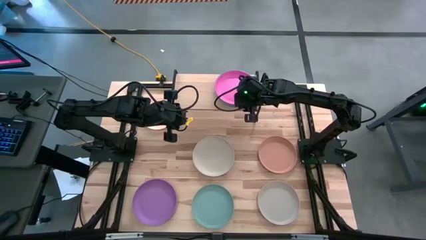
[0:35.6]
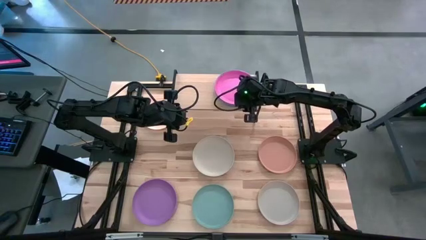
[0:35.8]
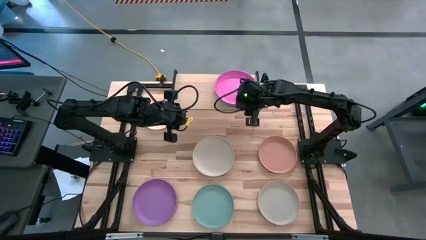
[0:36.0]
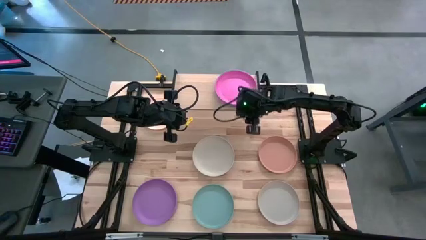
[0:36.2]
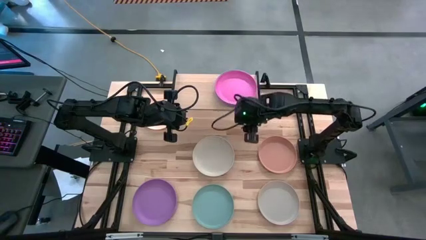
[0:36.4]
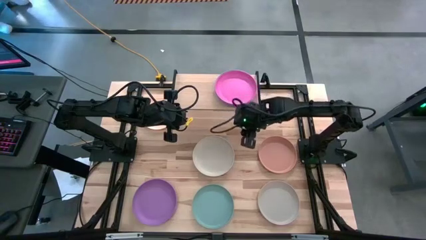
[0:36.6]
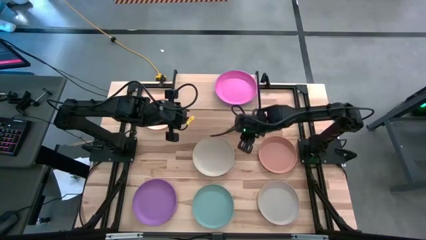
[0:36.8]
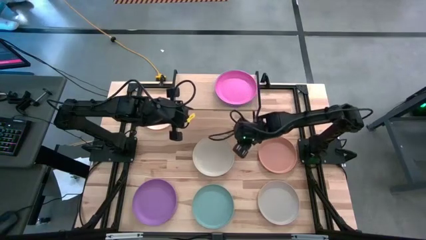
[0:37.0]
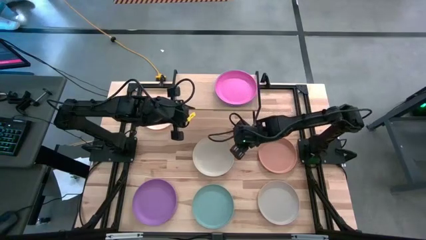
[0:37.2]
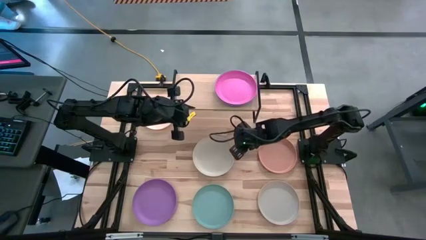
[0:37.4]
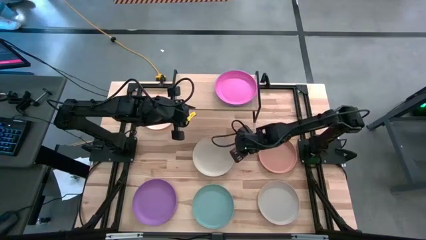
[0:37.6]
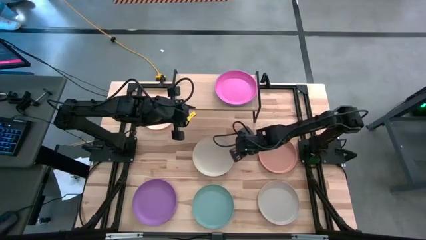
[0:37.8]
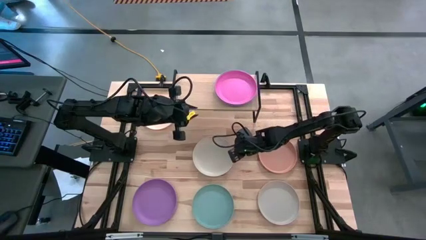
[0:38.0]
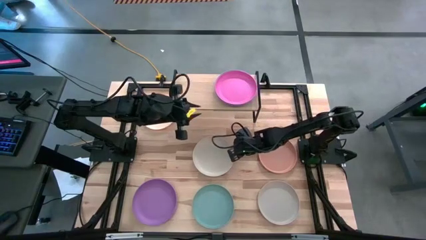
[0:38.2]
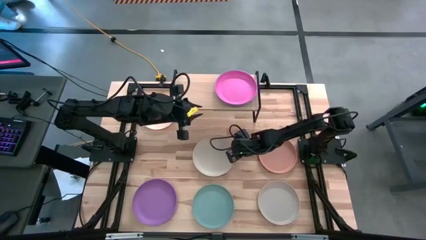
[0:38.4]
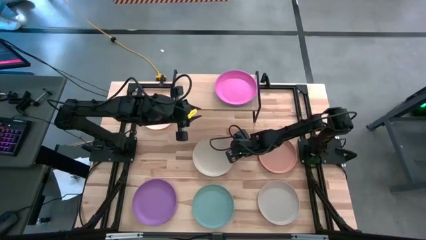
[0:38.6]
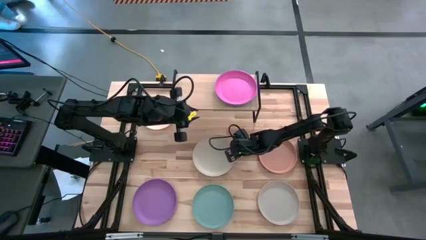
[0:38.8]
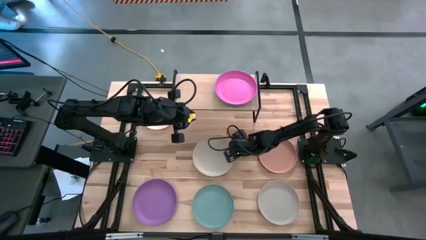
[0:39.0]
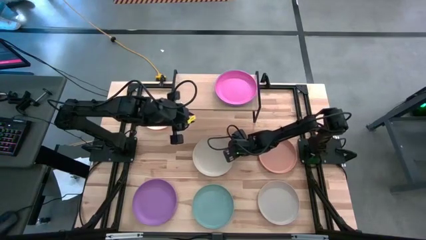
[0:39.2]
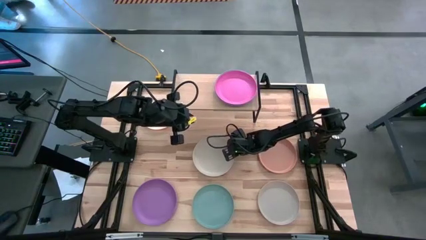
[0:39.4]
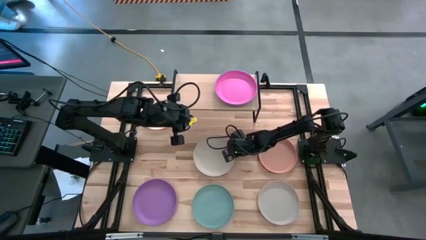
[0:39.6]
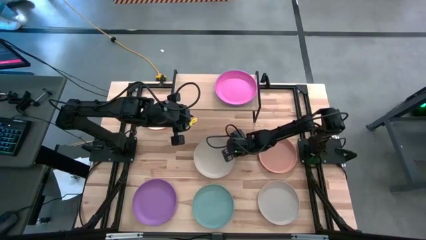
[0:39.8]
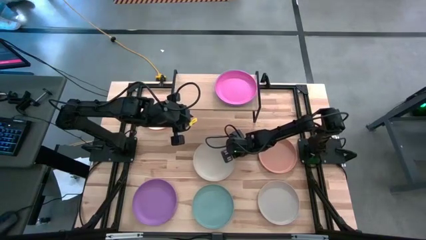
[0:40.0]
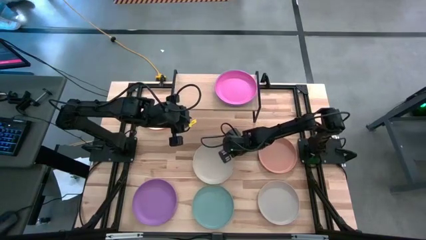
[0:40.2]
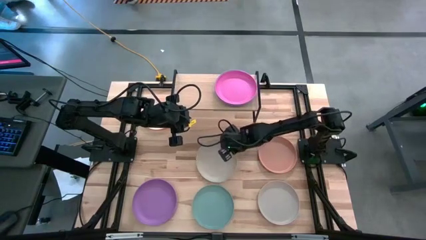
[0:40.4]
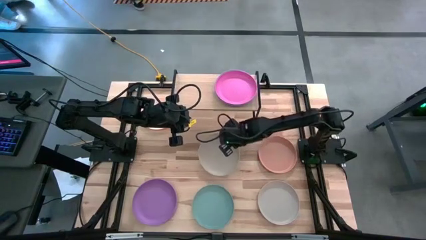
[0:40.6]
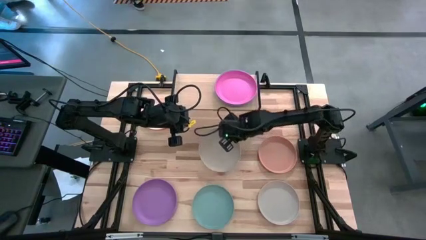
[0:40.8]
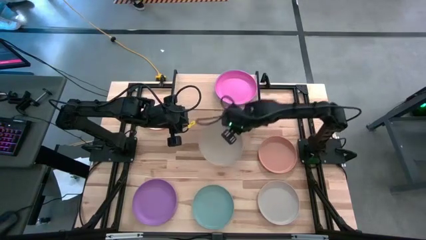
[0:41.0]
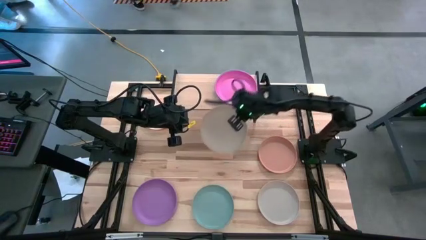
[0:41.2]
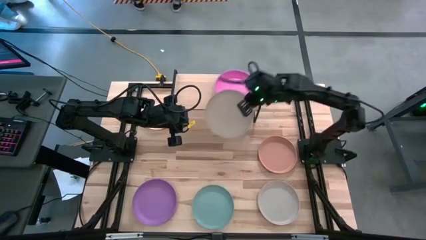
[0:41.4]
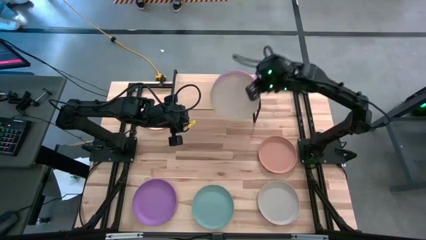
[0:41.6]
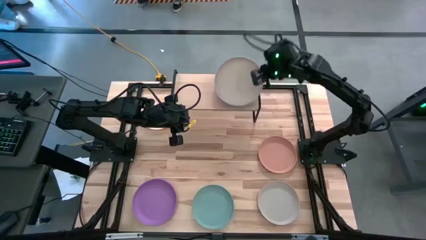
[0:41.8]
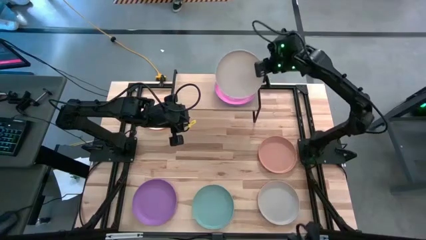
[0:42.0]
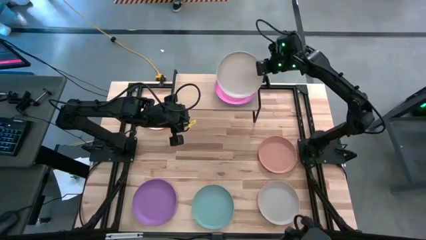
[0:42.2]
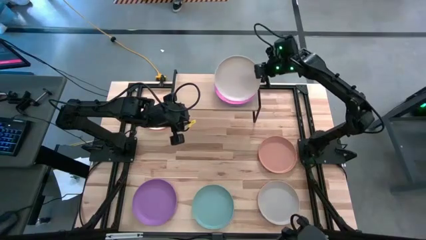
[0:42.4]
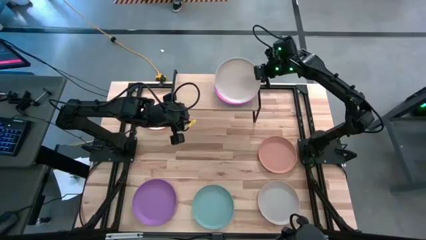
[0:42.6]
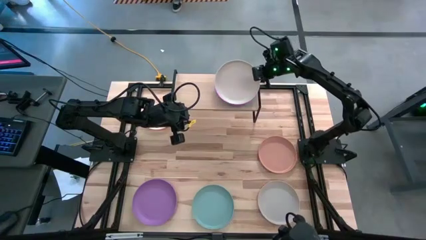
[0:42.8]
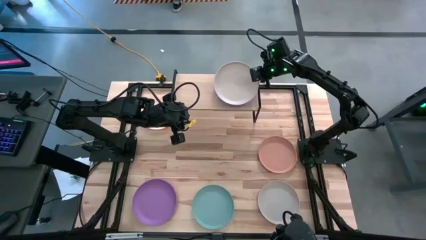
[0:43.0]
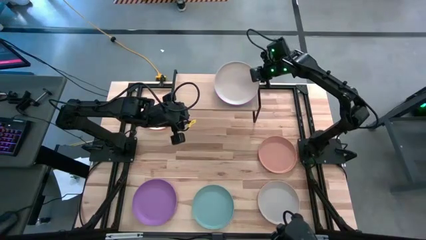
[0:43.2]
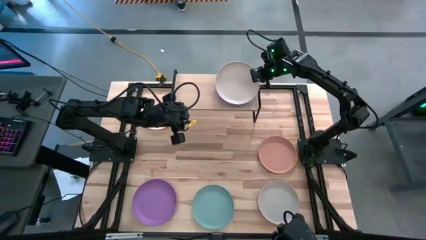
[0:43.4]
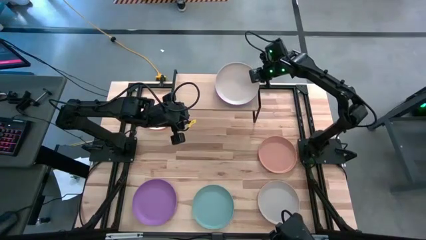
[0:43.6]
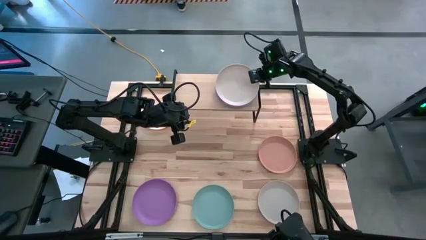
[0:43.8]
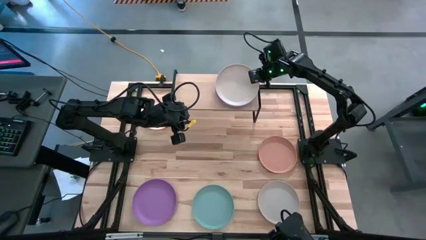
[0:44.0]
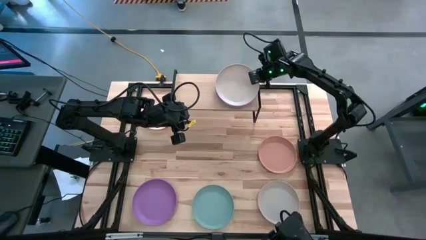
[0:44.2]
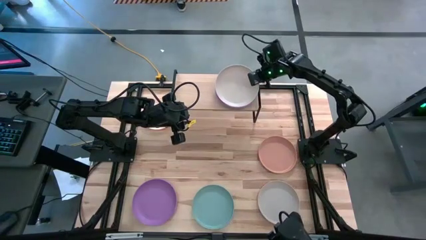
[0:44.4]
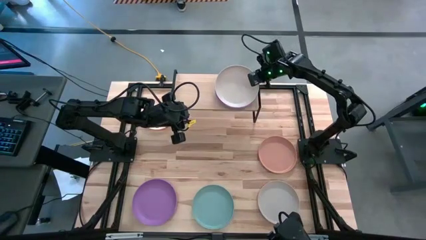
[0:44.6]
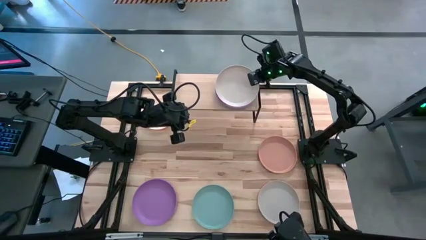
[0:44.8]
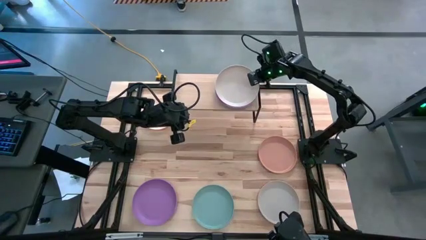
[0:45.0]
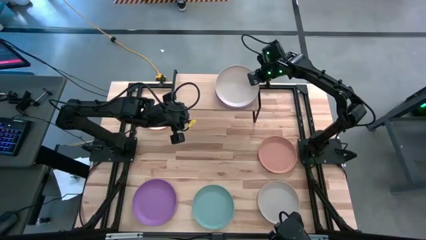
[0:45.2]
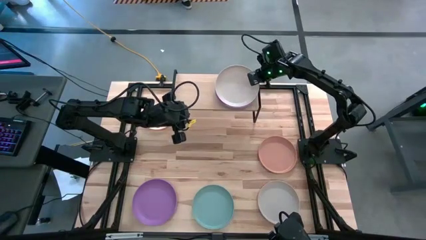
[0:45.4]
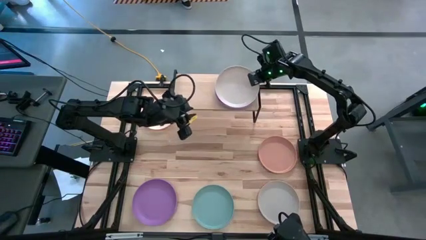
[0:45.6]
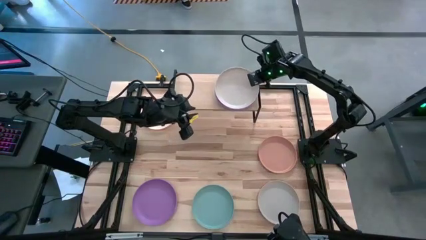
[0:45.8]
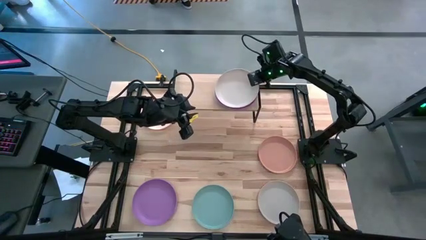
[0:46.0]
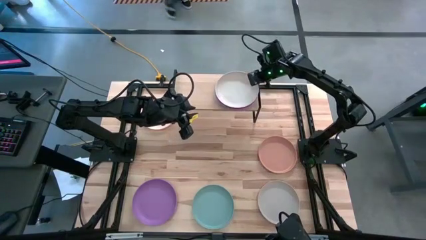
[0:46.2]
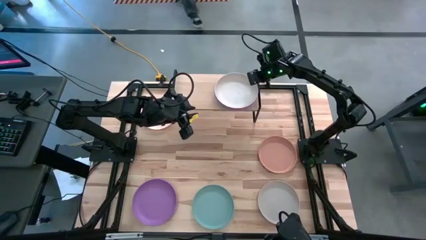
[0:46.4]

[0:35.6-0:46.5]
Task: Place and stack plates onto a shelf
Stack the top white plate on top of the pink plate on the shelf
